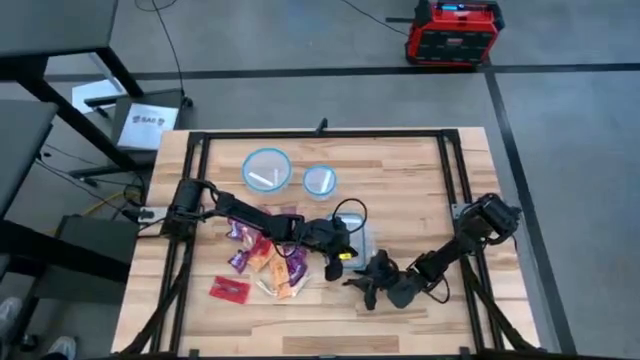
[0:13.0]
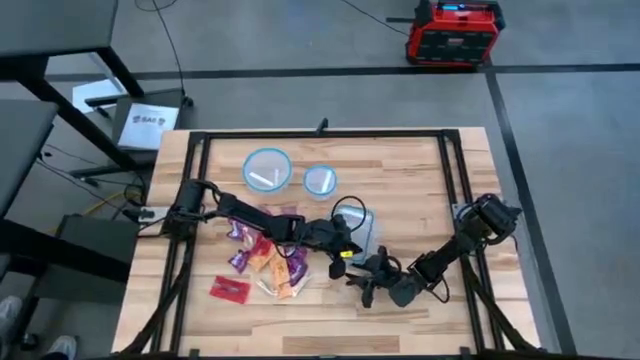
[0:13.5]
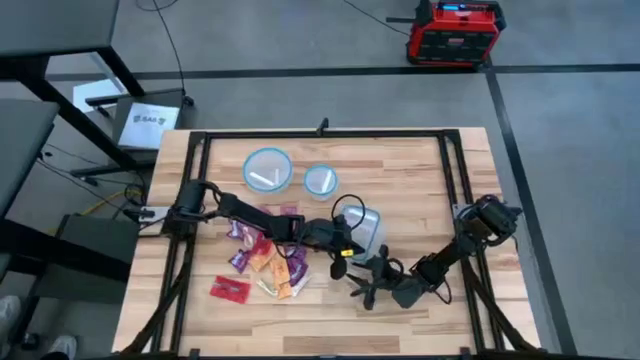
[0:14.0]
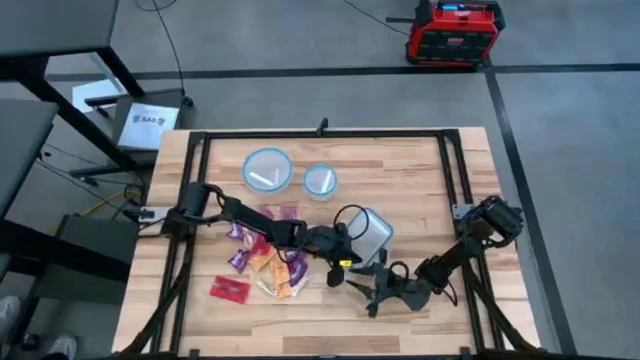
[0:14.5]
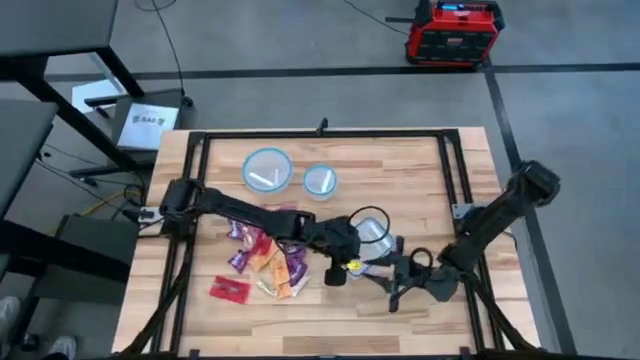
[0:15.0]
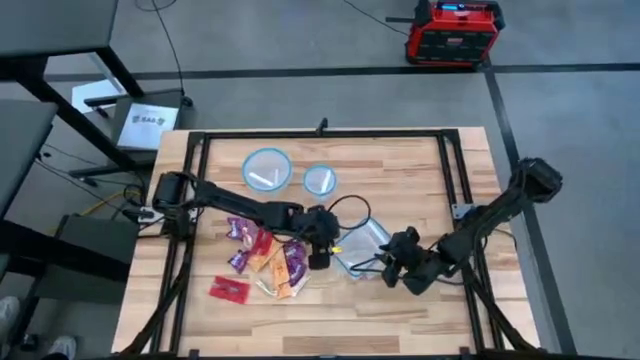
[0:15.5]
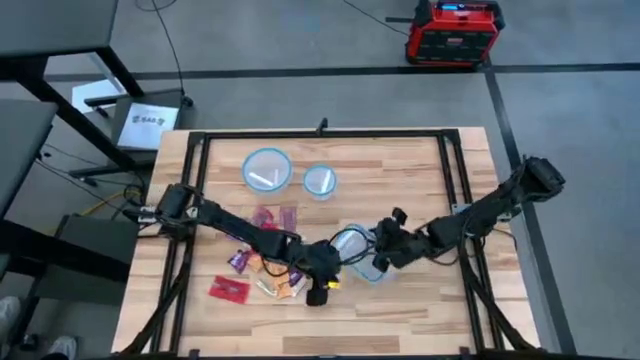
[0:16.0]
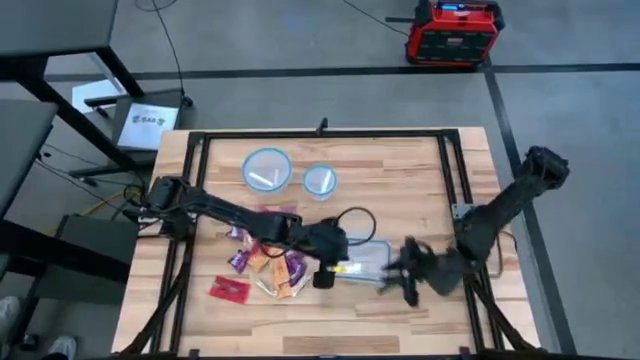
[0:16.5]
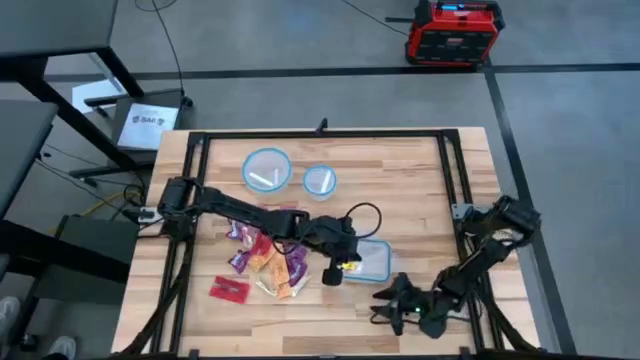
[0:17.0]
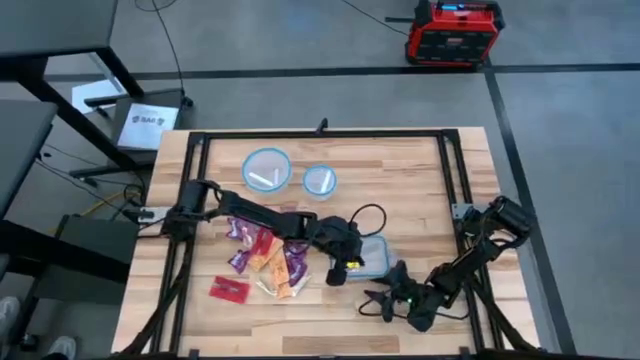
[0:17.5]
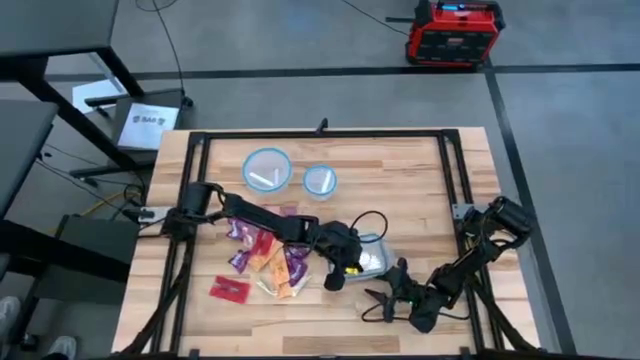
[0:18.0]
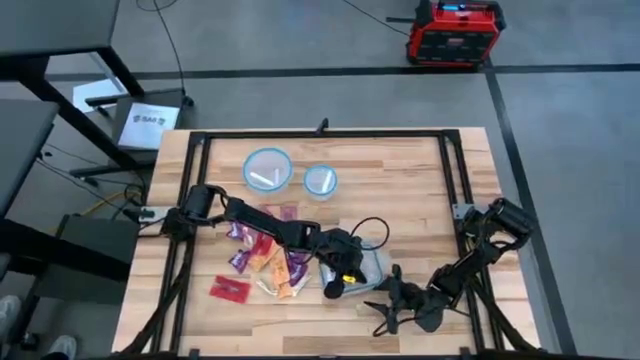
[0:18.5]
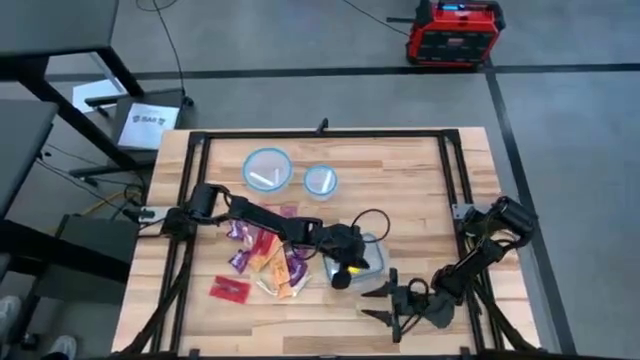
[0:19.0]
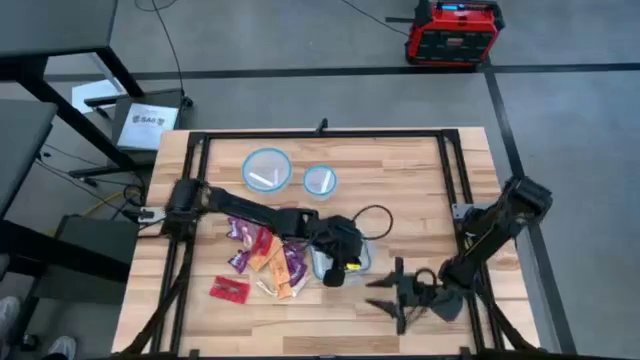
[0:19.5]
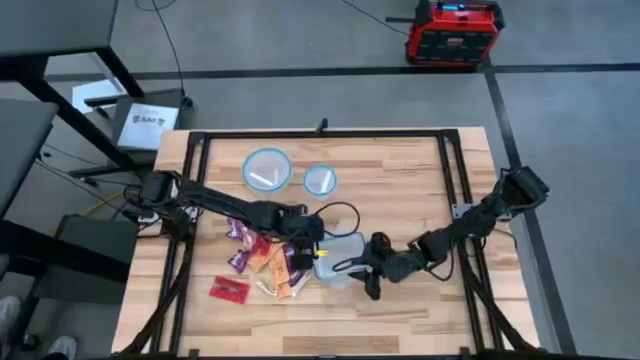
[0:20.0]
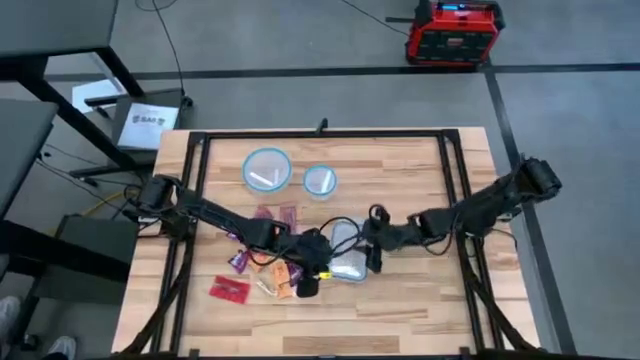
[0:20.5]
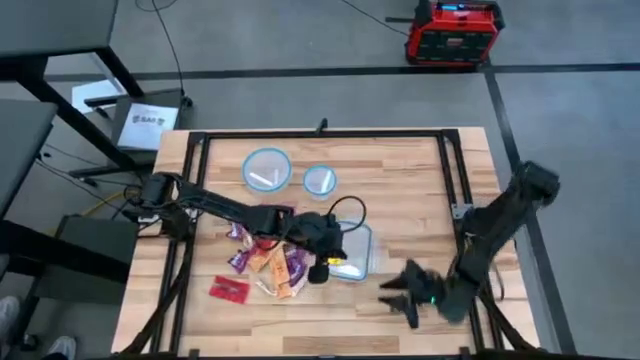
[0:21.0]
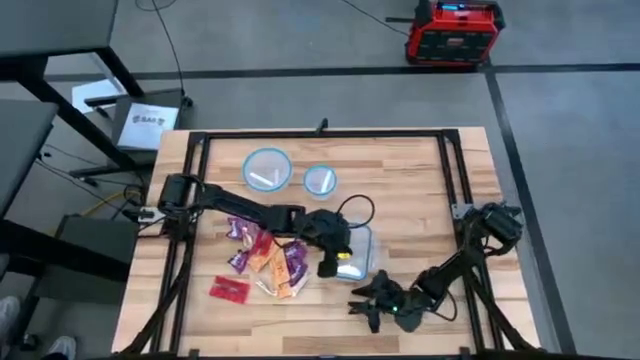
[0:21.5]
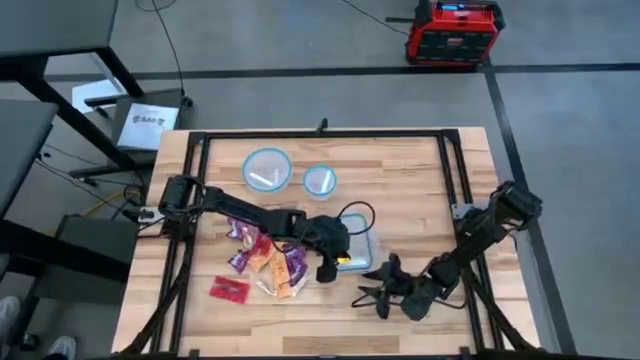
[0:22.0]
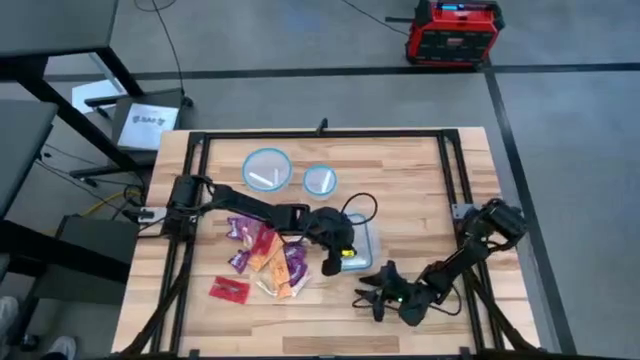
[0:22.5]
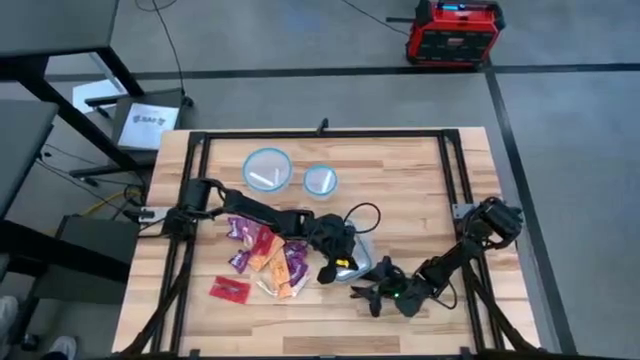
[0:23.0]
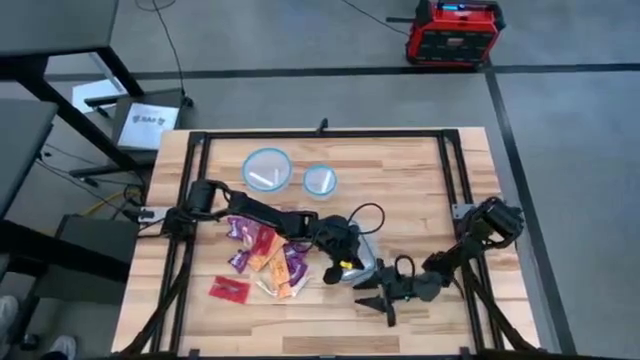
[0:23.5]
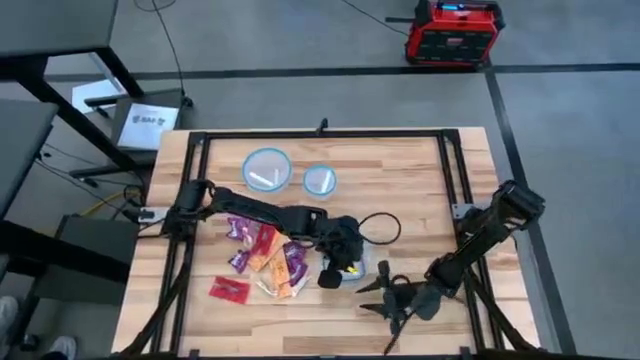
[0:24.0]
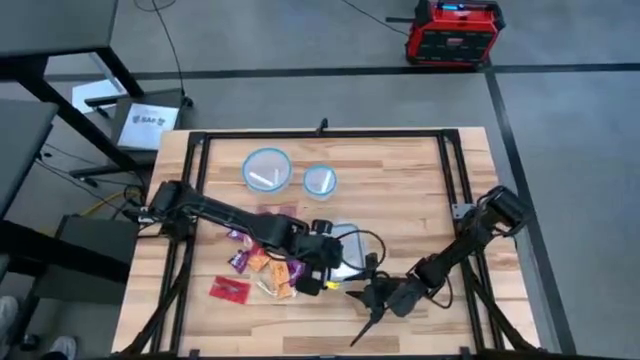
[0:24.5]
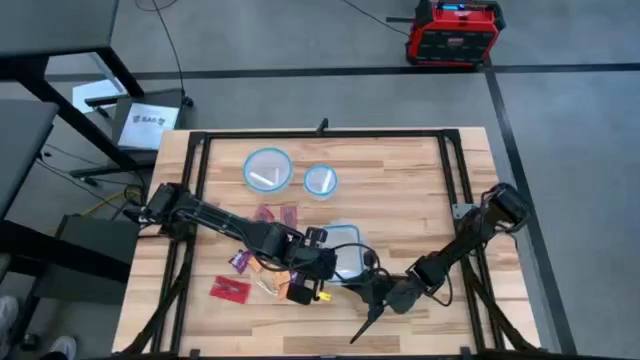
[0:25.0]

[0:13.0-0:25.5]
Task: Sort candy
Open the top right transparent bin

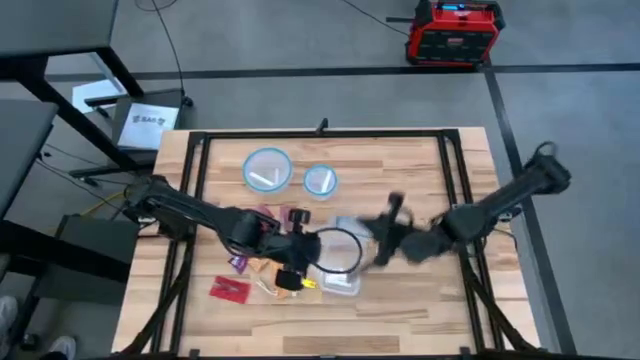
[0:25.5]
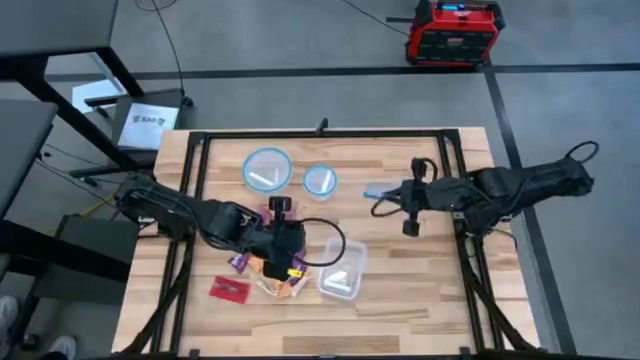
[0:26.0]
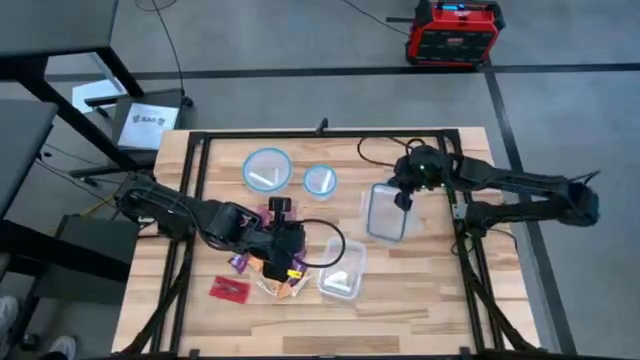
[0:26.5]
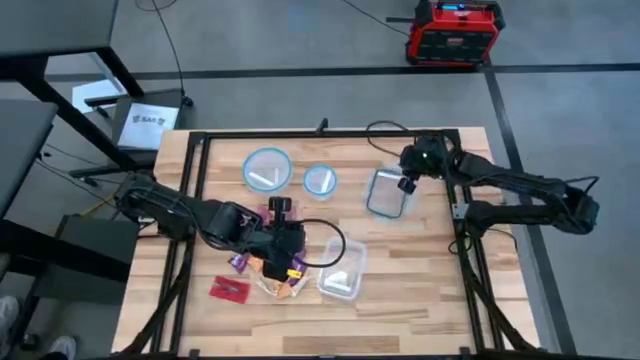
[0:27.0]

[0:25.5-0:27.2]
Move the transparent bin lid to the top right

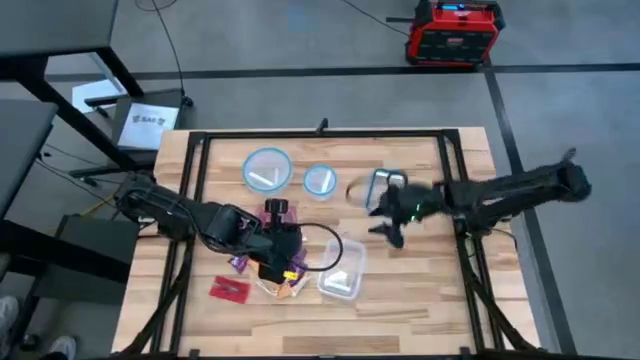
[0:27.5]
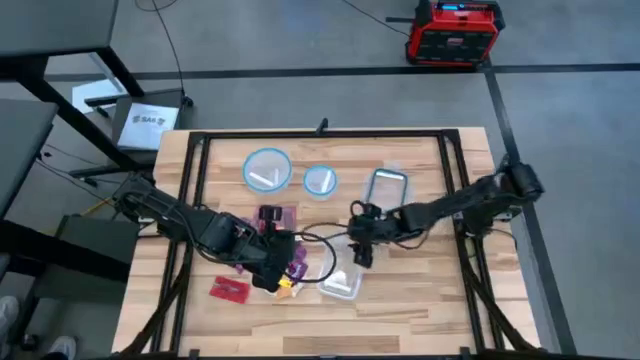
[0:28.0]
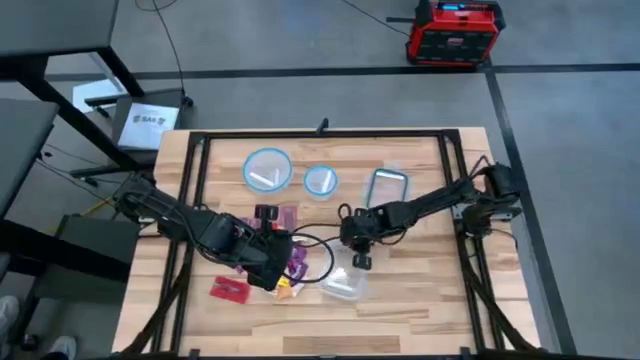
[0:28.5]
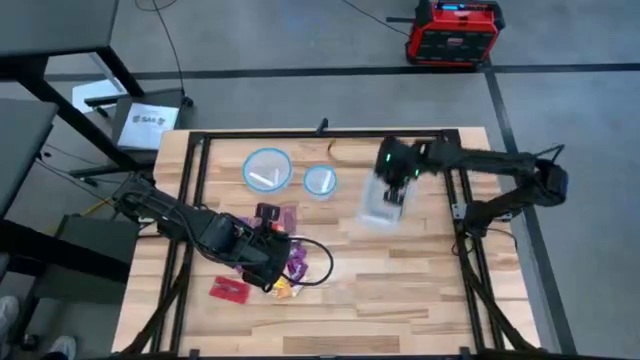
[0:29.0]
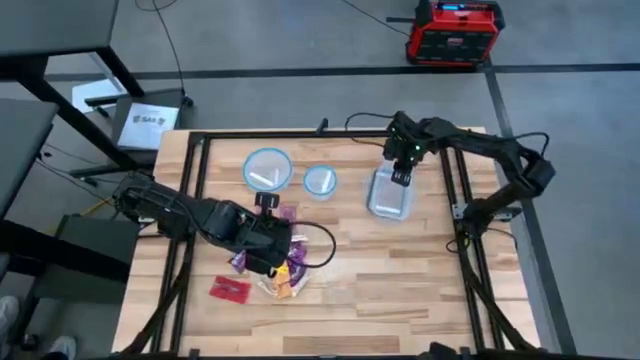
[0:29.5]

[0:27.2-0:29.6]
Move the transparent bin onto the top transparent bin lid

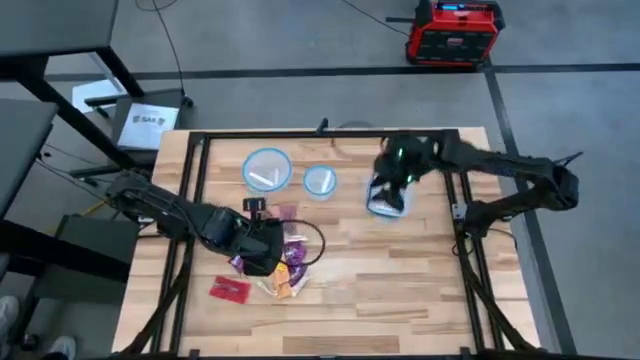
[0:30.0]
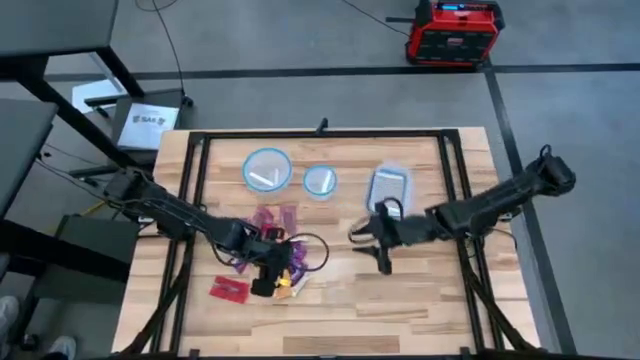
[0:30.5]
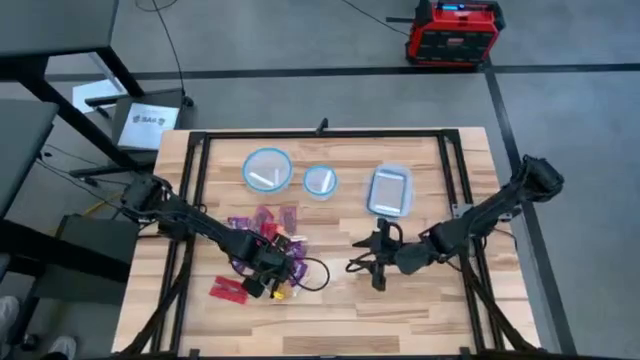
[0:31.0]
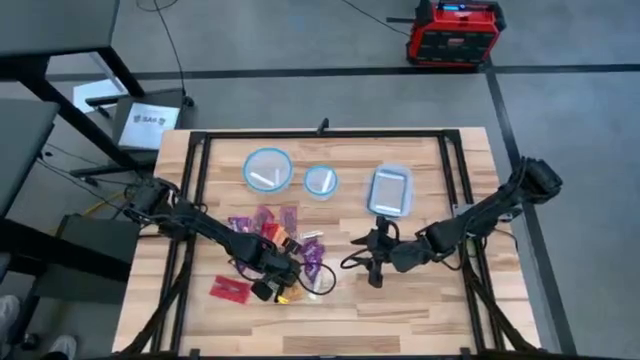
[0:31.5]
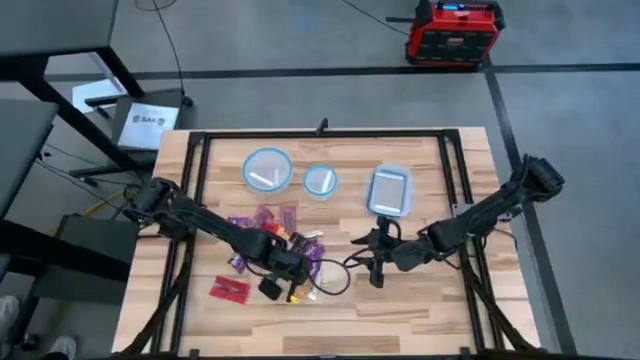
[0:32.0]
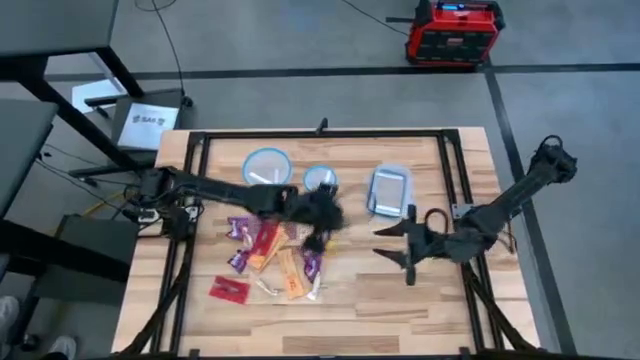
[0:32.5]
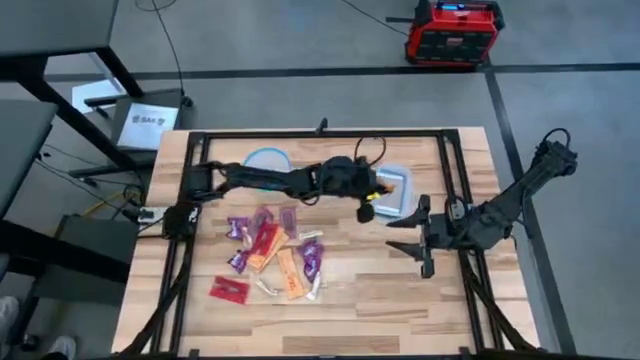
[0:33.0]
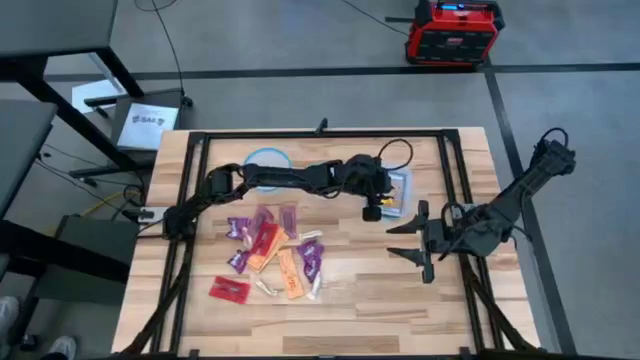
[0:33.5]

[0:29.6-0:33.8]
Put the orange candy into the top right transparent bin

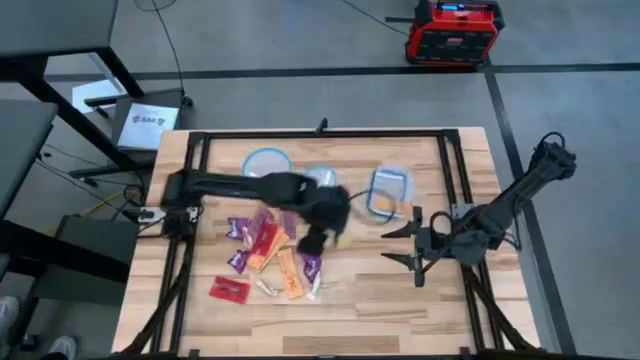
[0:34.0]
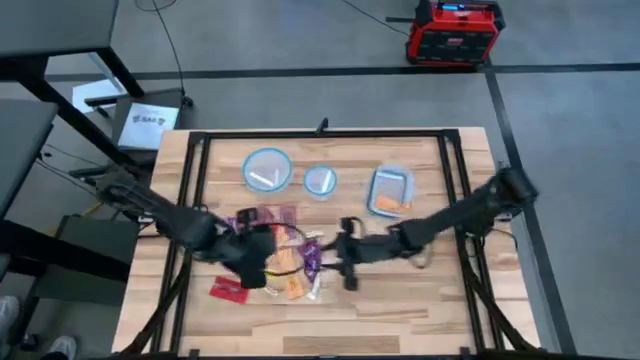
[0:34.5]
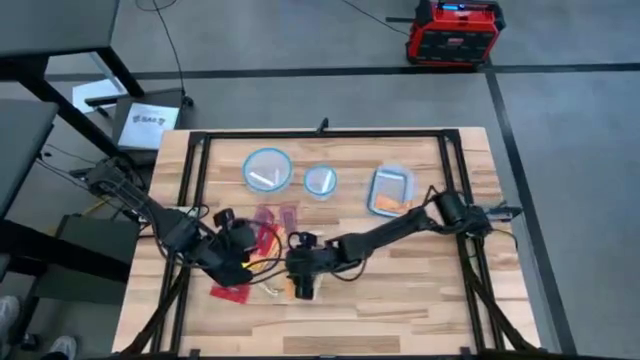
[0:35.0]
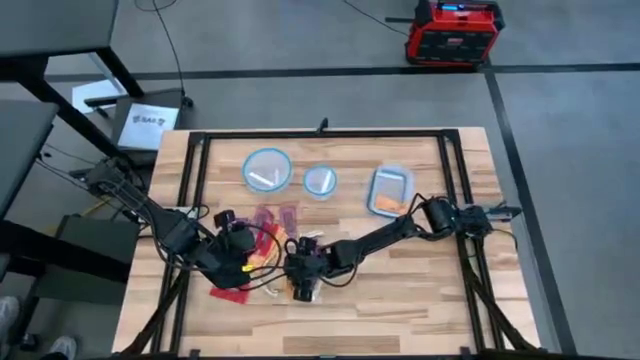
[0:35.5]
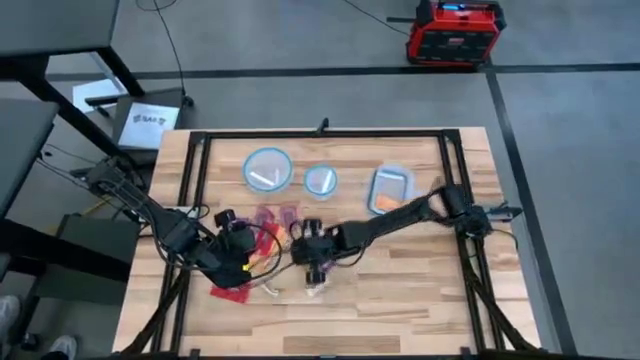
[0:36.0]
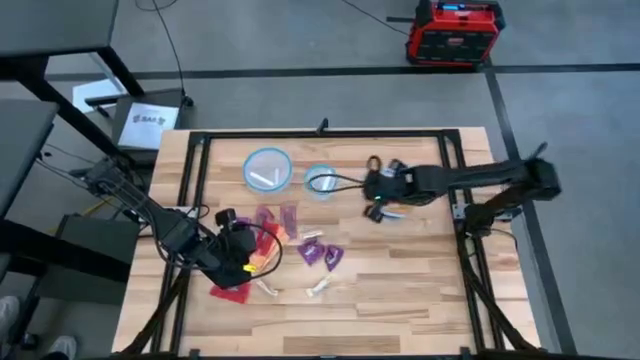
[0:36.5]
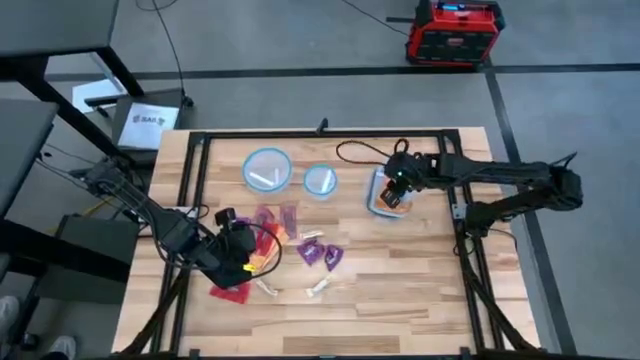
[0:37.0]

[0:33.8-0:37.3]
Put the bottom right orange candy into the top right transparent bin
